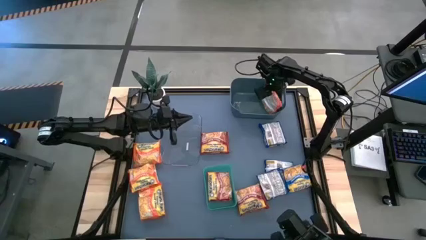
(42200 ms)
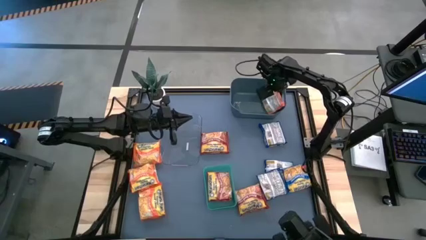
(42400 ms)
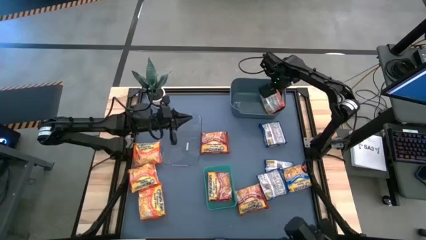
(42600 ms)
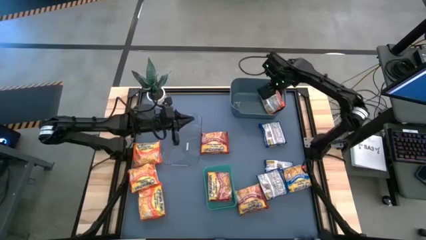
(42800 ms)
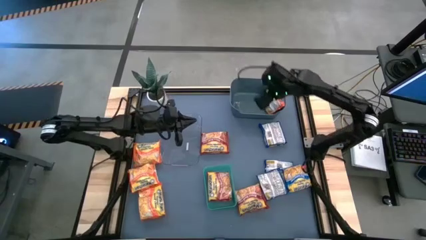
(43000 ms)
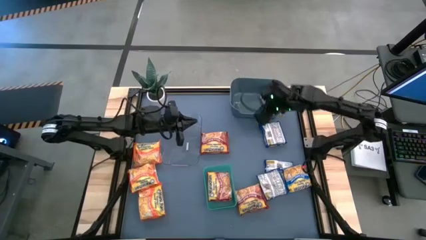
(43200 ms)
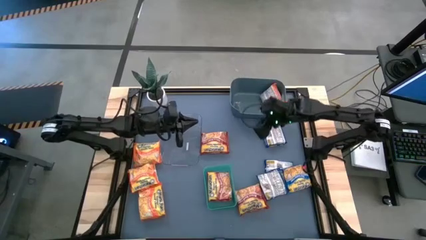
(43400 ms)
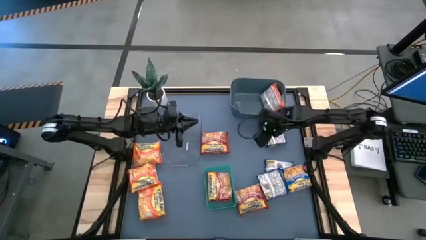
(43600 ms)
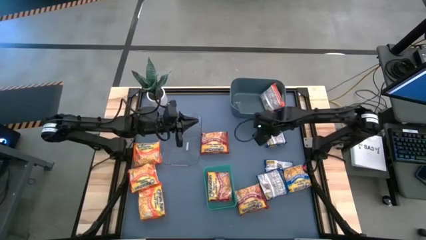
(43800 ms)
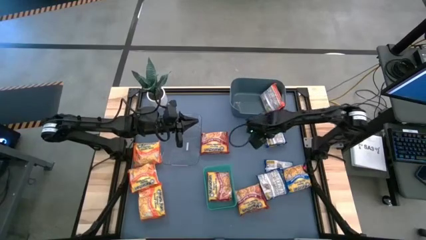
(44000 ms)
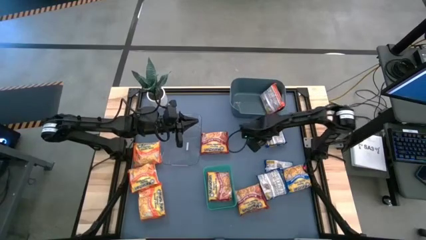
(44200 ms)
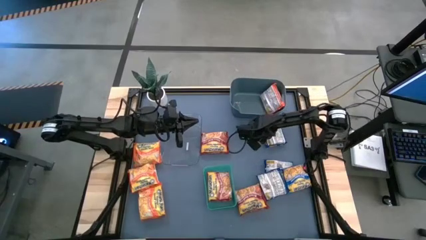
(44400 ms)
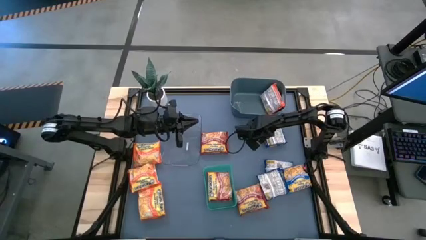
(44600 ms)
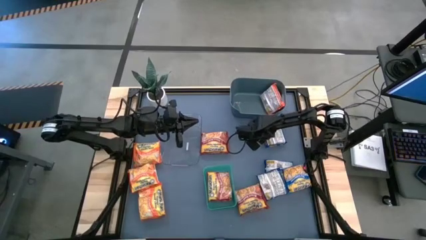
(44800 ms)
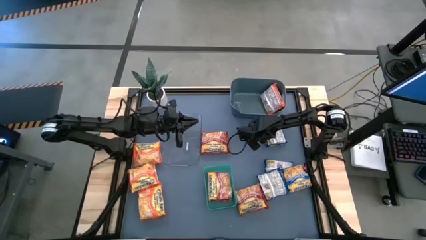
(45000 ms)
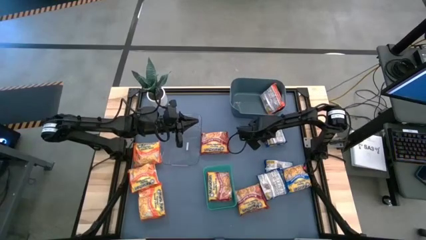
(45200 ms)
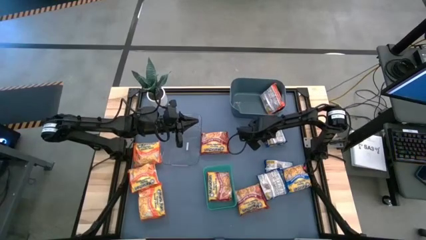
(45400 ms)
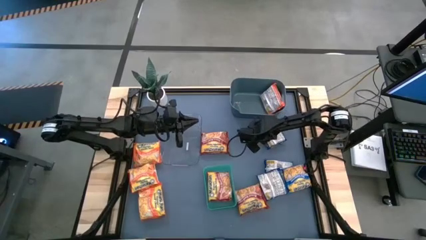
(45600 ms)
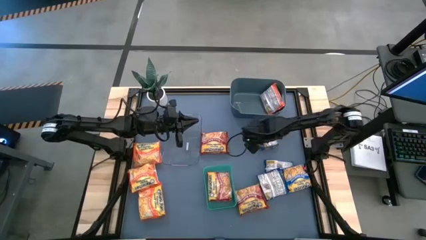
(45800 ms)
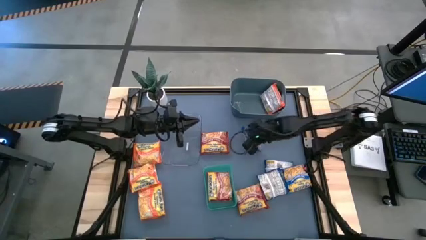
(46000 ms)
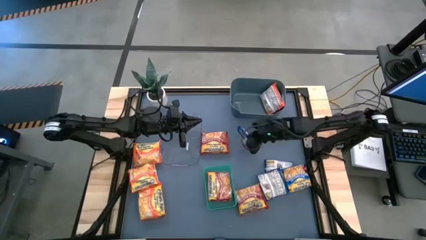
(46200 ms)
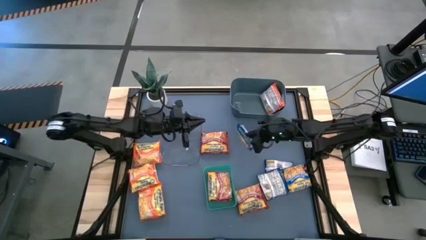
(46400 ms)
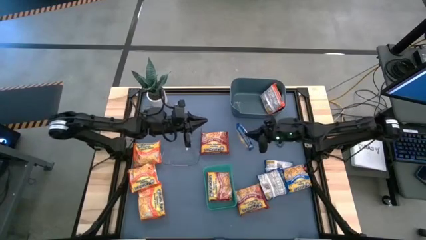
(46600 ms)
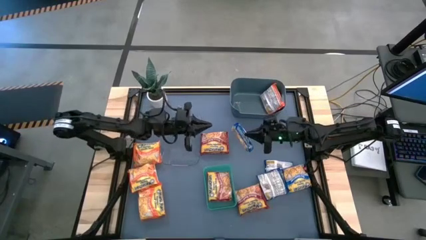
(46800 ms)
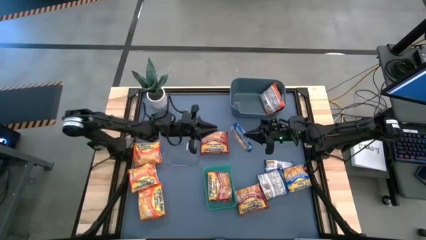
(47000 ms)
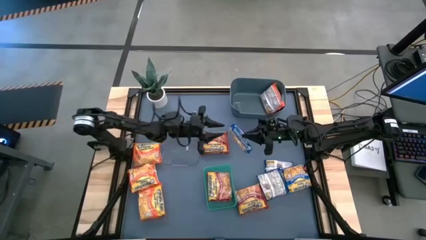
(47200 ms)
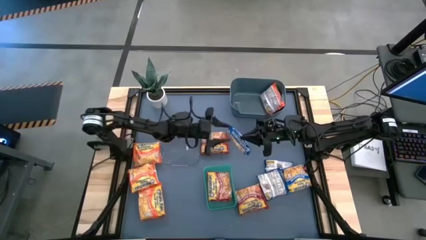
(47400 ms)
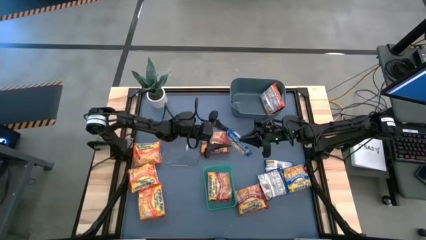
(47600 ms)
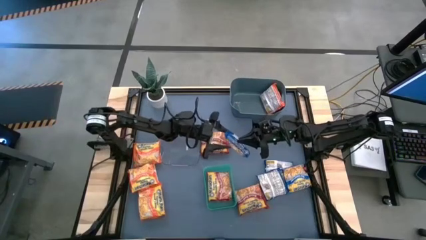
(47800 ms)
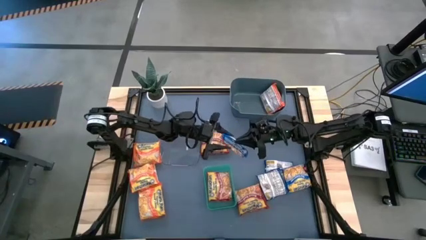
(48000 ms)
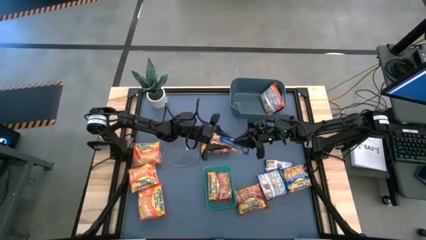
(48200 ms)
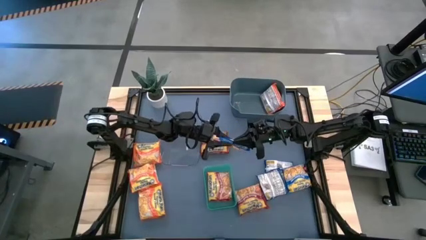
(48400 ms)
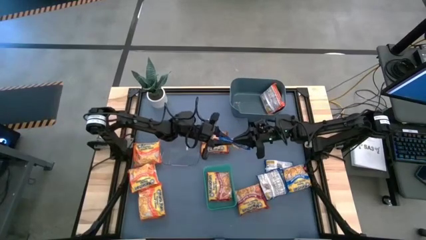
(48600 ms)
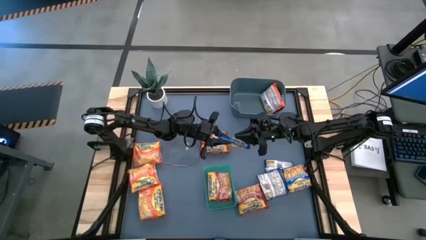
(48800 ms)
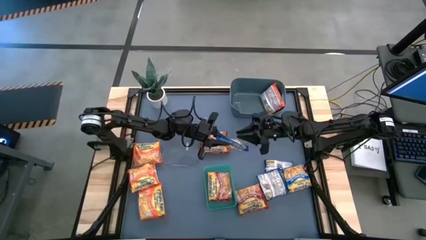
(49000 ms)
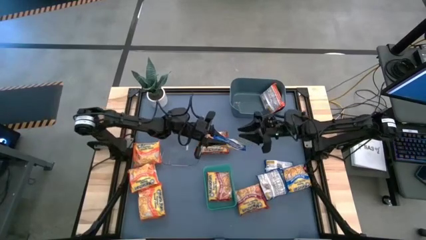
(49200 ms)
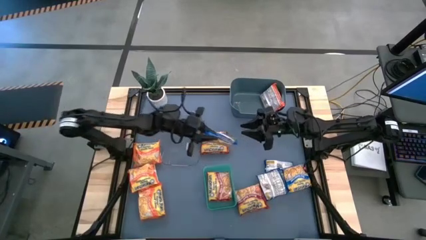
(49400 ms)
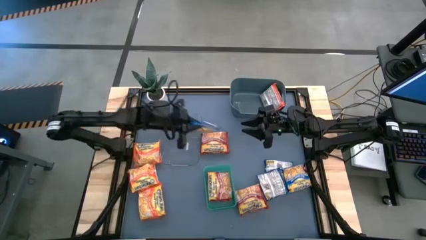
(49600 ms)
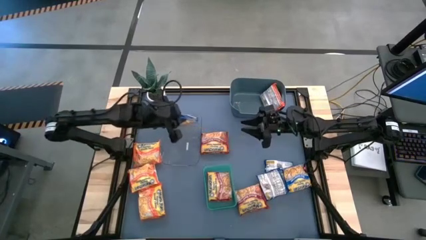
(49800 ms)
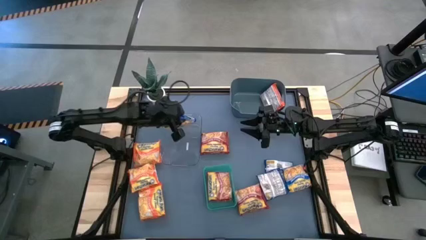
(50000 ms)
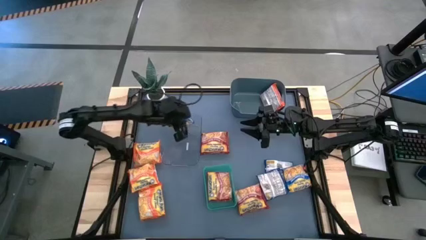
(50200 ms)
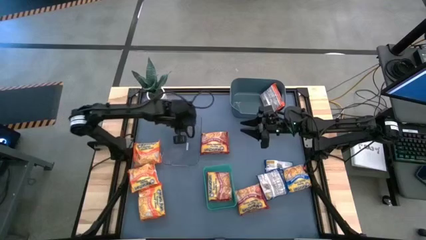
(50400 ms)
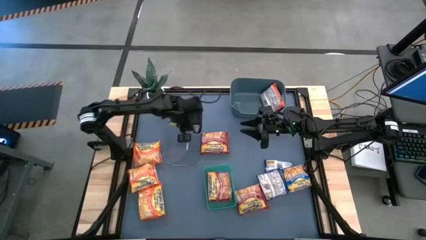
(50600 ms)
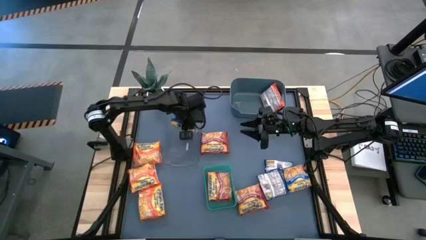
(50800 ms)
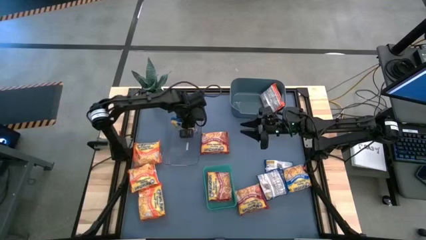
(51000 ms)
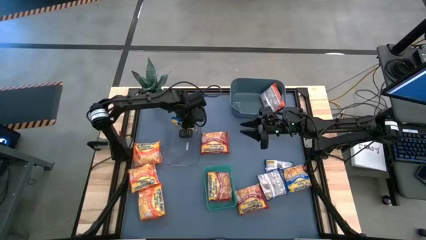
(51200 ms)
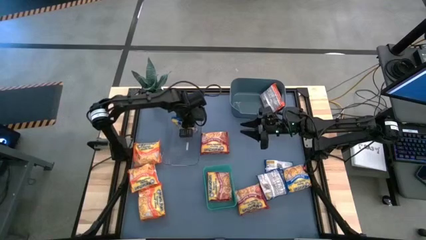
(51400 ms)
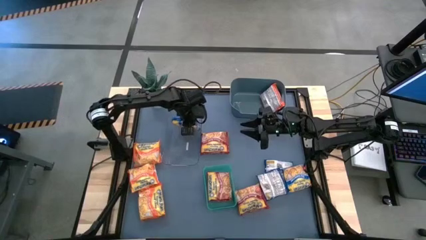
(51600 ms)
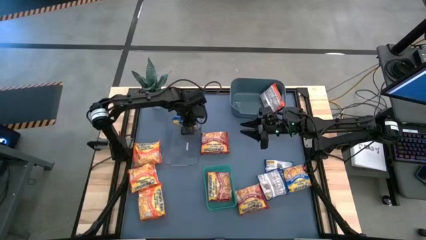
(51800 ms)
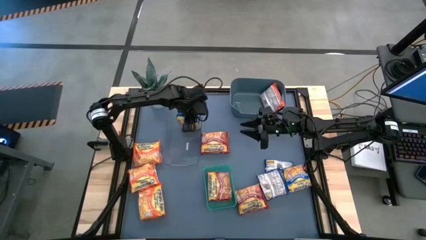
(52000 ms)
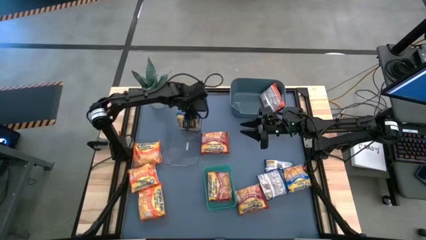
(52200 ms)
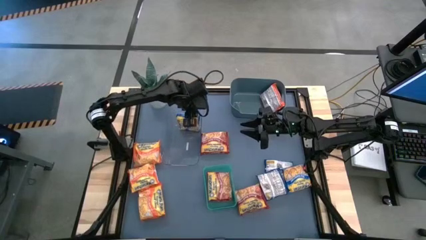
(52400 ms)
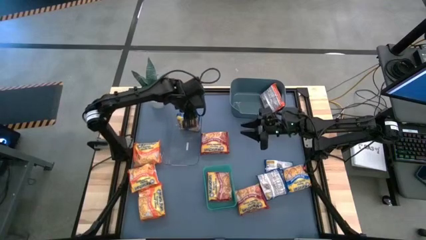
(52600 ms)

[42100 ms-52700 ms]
Task: Sort Maruchan noodles
Put the blue noodle pack into the transparent bin
